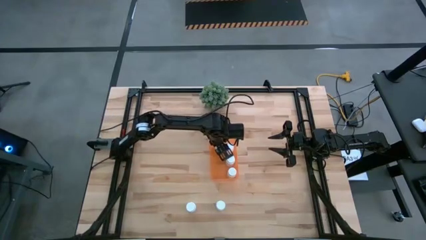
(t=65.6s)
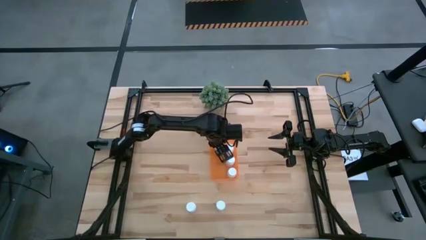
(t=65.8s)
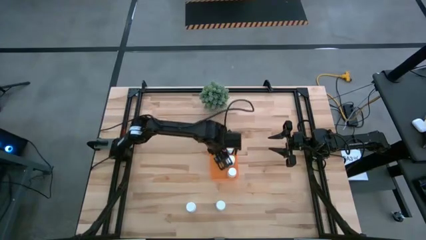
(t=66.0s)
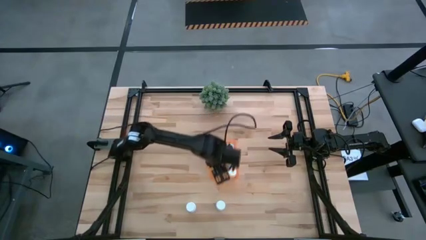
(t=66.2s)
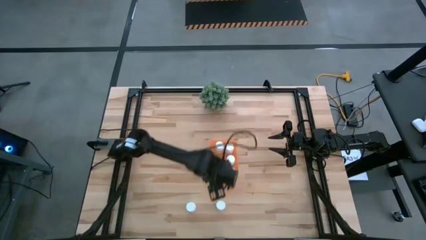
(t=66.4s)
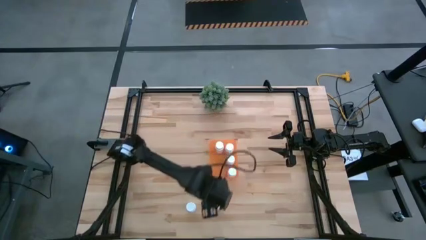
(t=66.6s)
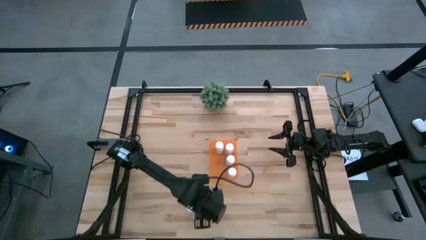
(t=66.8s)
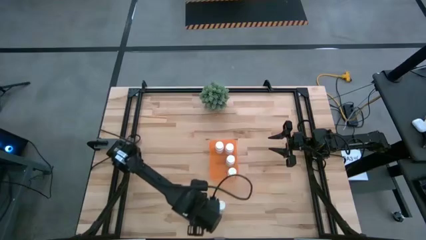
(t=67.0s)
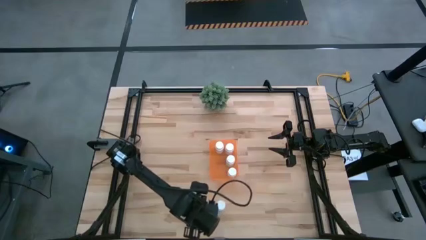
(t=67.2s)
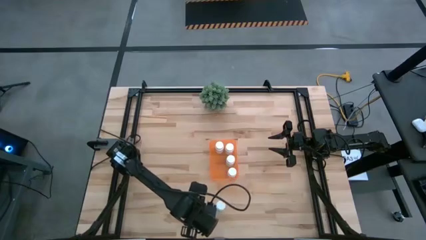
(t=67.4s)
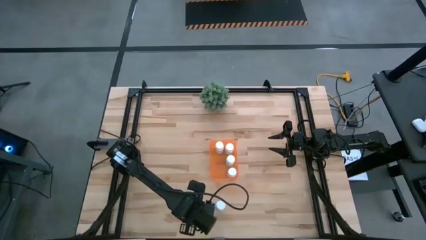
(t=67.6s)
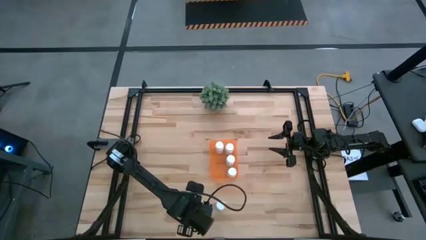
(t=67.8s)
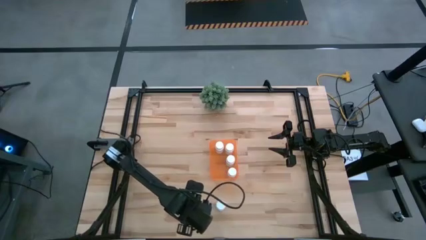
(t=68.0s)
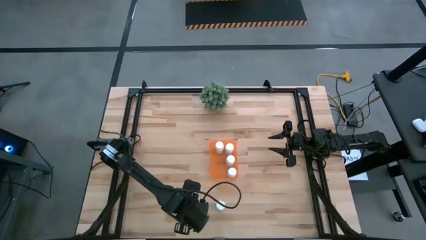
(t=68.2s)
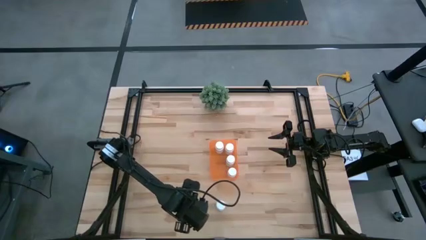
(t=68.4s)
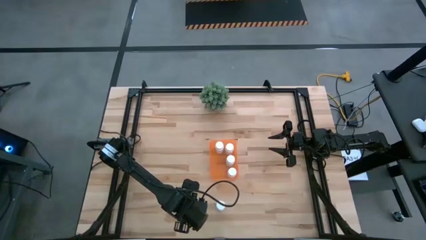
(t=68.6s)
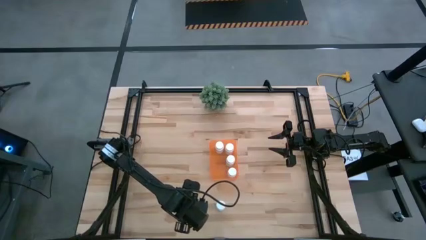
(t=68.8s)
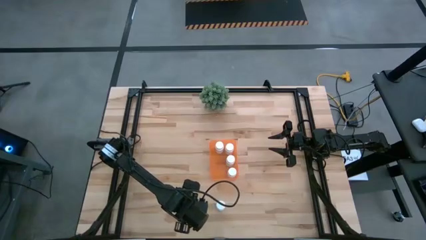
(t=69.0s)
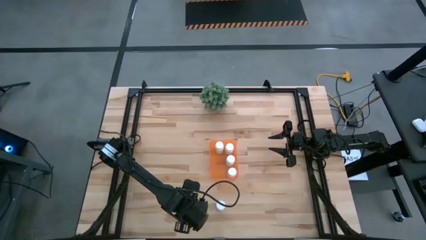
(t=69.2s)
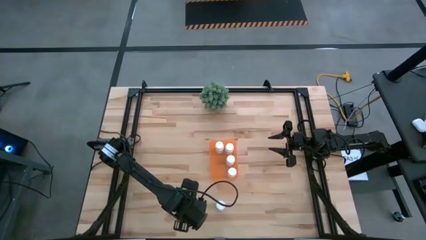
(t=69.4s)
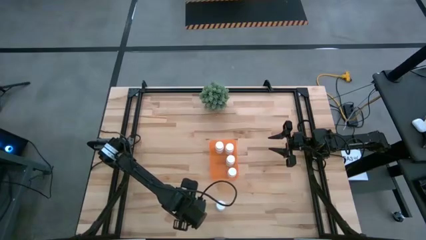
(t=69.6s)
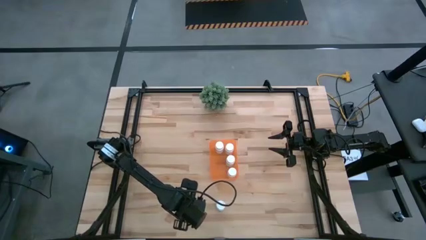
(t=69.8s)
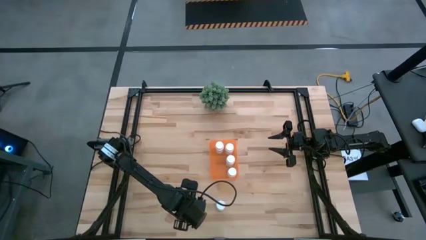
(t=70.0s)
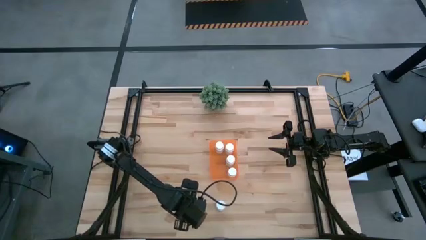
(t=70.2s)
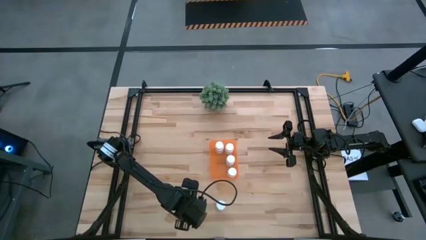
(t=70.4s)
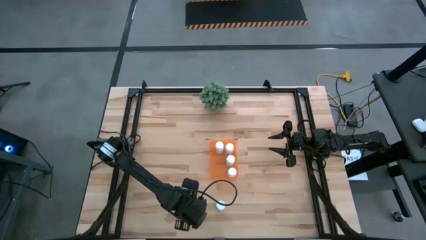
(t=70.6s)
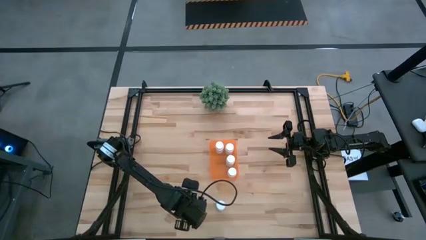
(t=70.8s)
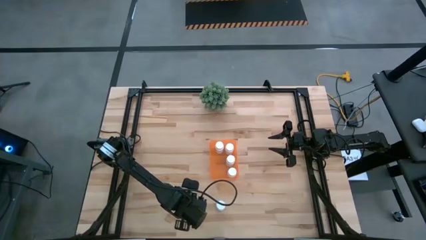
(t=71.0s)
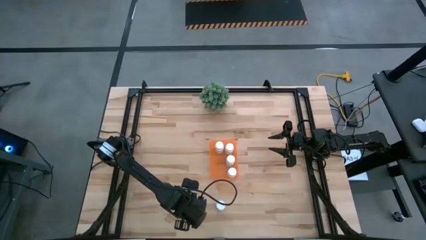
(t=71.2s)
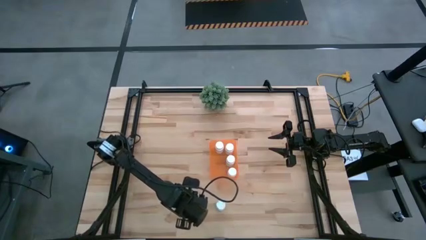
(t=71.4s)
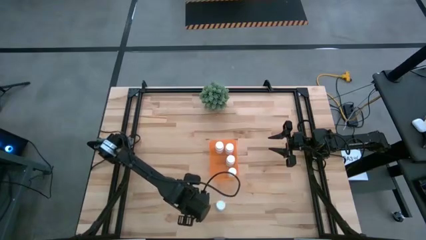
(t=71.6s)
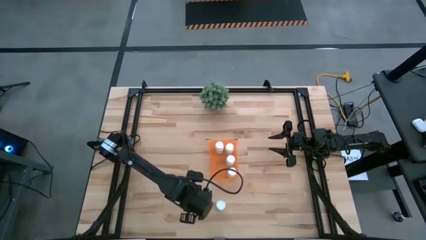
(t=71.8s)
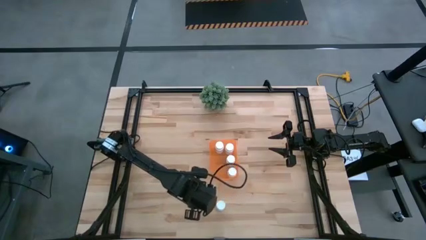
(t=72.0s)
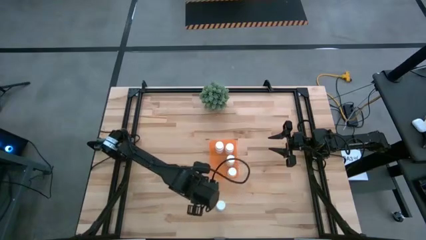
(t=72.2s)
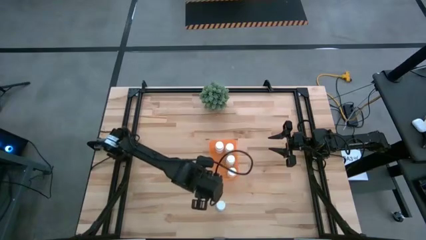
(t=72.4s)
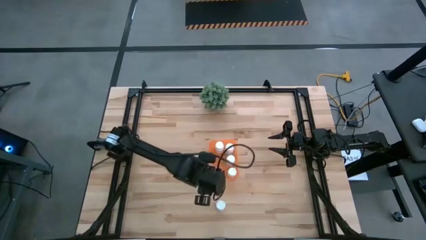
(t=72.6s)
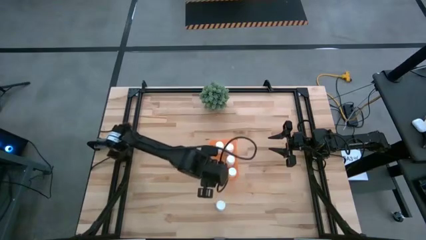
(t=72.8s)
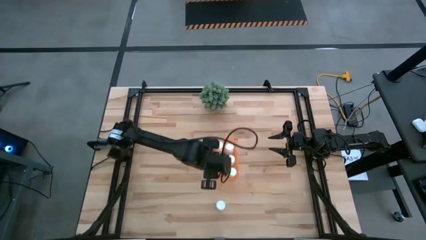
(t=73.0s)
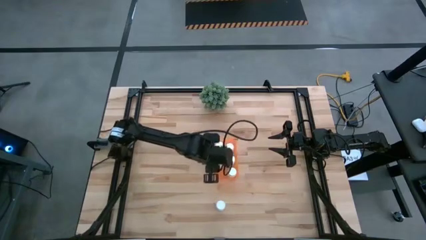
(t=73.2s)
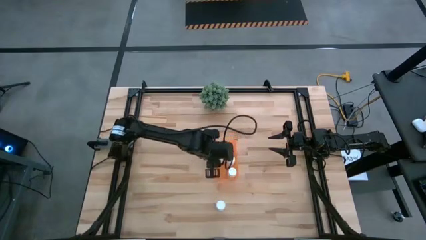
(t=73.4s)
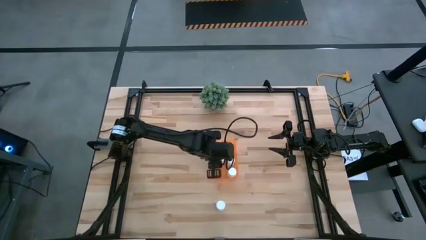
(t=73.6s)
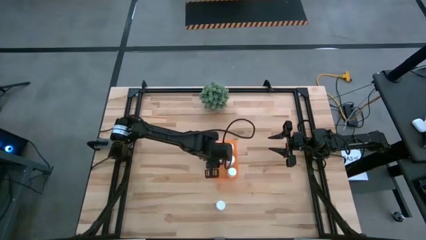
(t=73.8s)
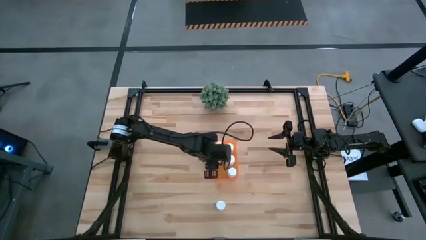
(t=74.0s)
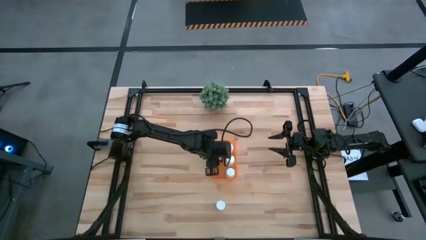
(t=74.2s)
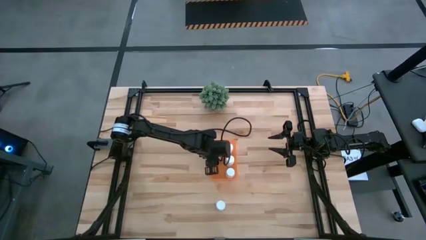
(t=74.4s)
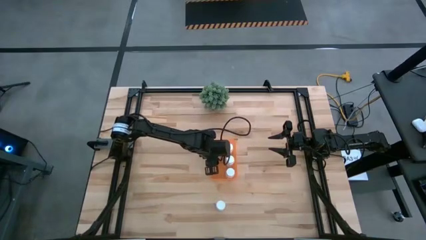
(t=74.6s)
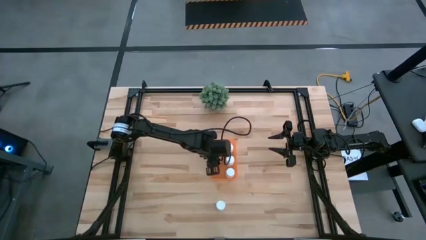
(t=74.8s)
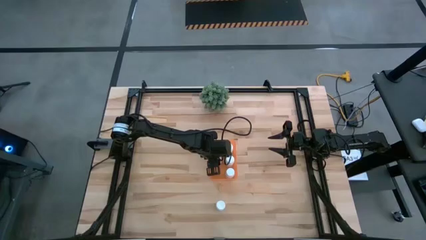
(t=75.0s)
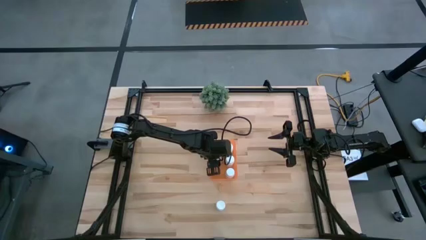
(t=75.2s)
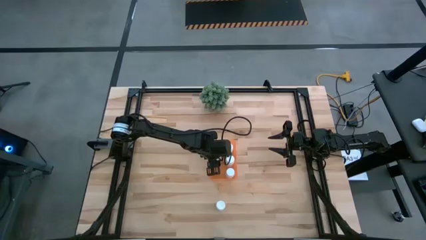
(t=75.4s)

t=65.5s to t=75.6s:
Task: Pick and place pill bottles into a basket
Put the white pill bottle into the orange bin

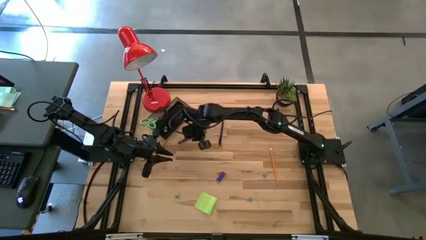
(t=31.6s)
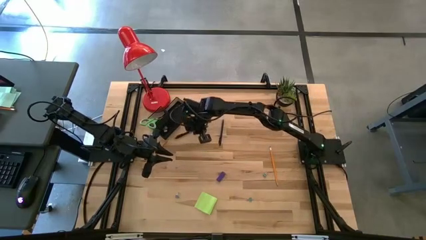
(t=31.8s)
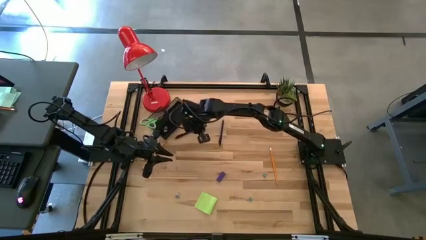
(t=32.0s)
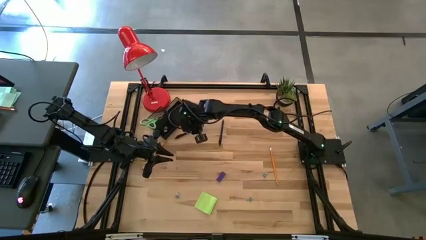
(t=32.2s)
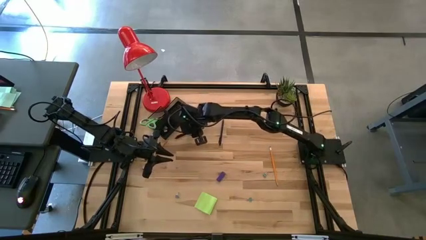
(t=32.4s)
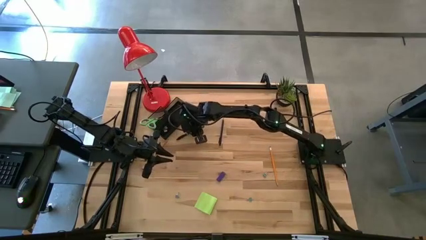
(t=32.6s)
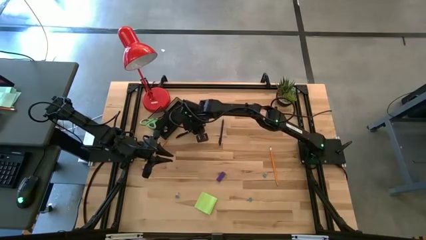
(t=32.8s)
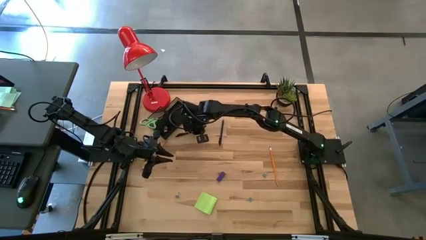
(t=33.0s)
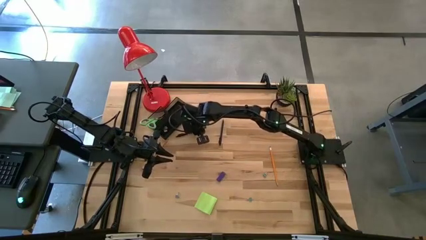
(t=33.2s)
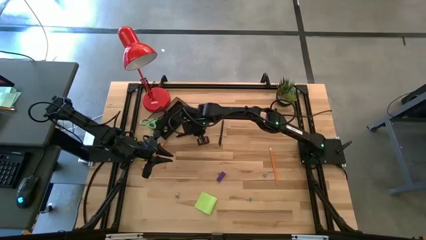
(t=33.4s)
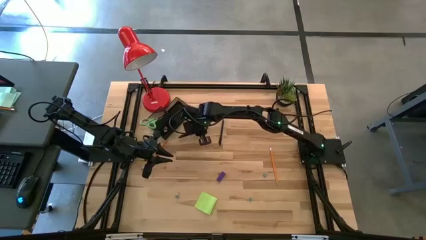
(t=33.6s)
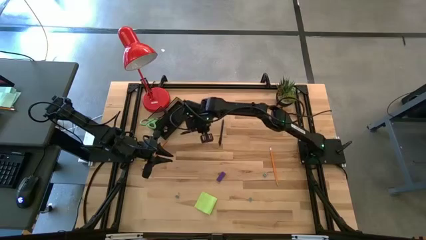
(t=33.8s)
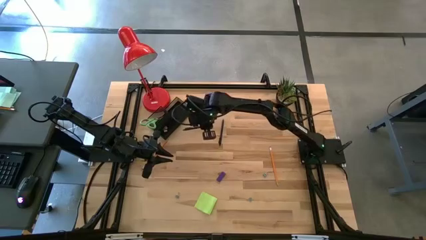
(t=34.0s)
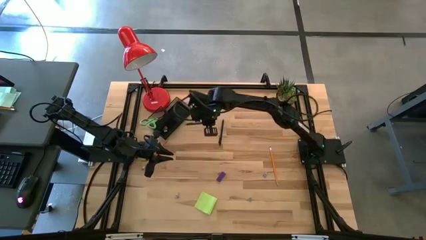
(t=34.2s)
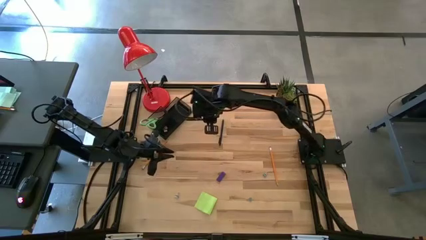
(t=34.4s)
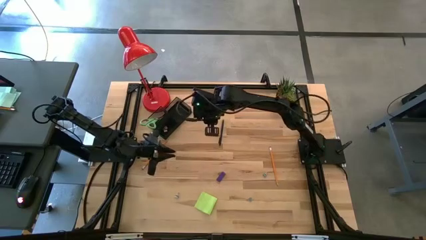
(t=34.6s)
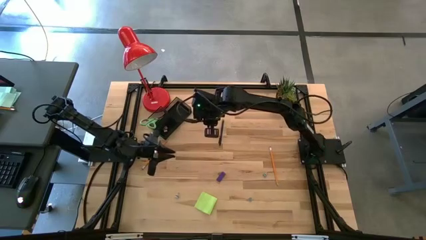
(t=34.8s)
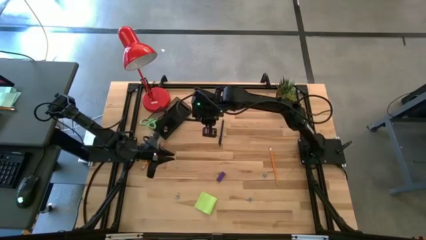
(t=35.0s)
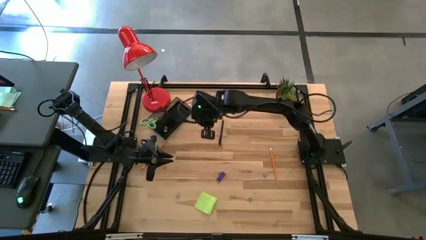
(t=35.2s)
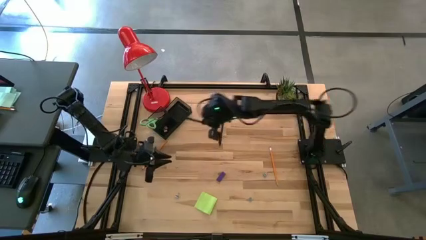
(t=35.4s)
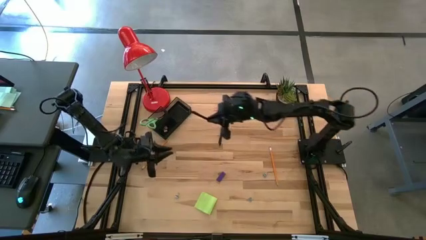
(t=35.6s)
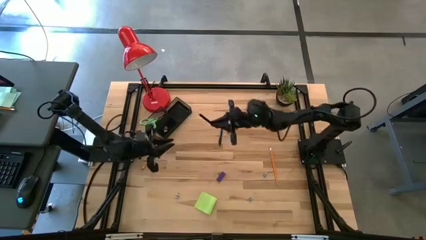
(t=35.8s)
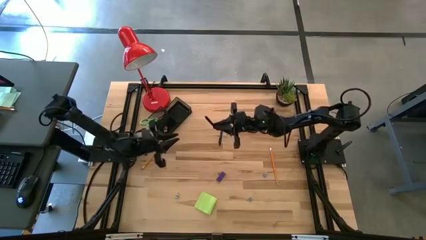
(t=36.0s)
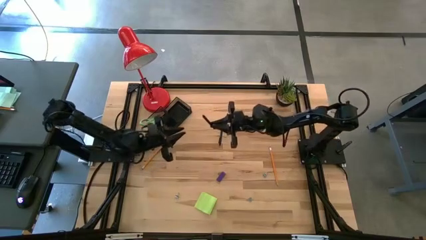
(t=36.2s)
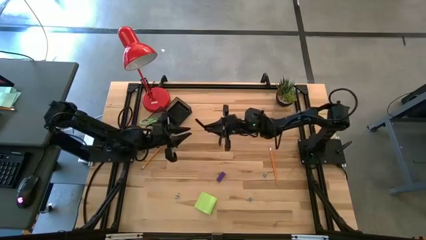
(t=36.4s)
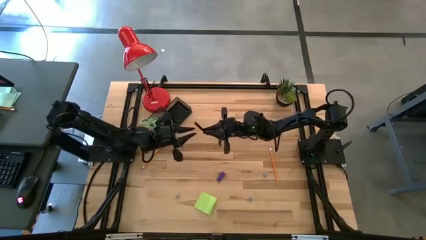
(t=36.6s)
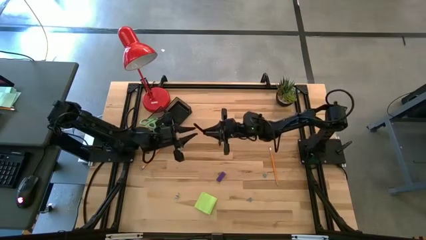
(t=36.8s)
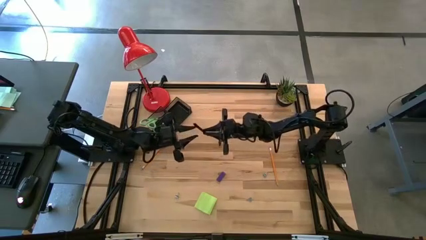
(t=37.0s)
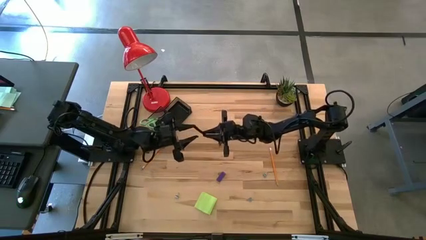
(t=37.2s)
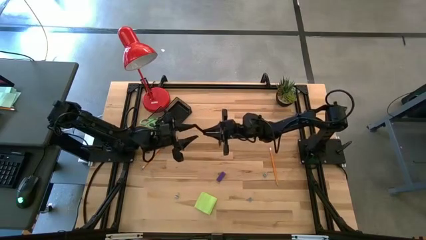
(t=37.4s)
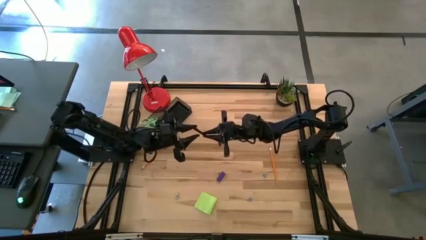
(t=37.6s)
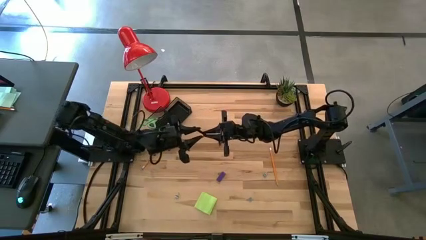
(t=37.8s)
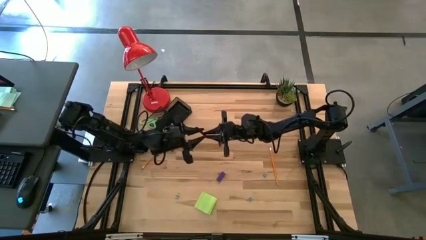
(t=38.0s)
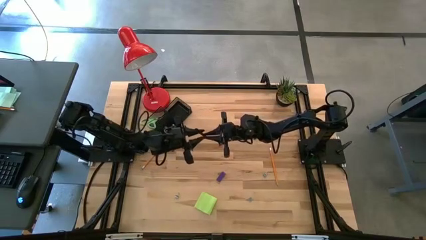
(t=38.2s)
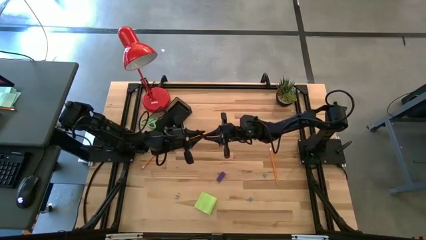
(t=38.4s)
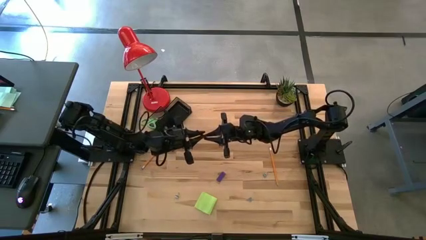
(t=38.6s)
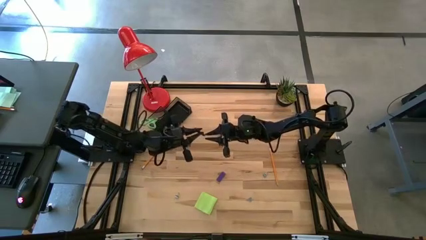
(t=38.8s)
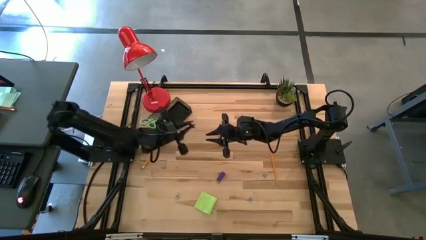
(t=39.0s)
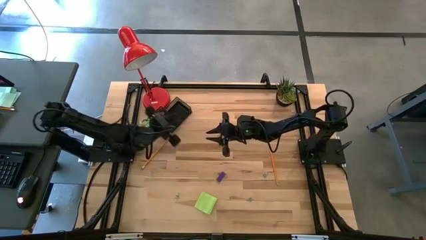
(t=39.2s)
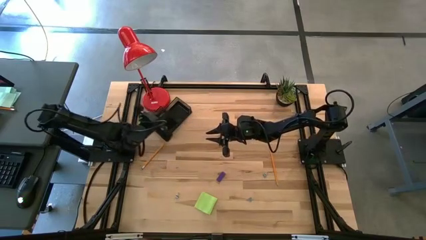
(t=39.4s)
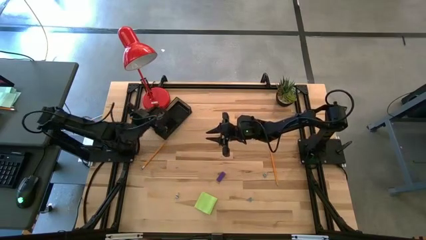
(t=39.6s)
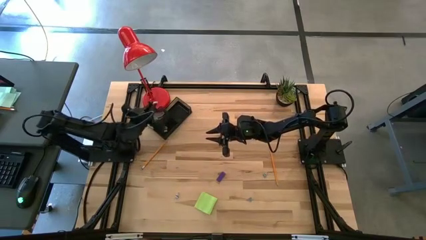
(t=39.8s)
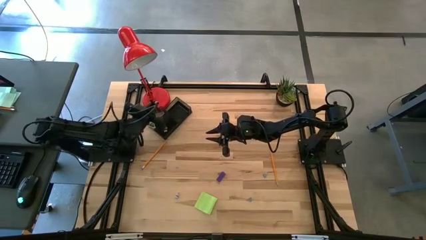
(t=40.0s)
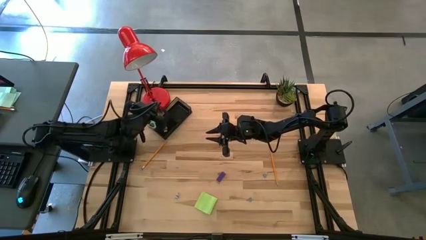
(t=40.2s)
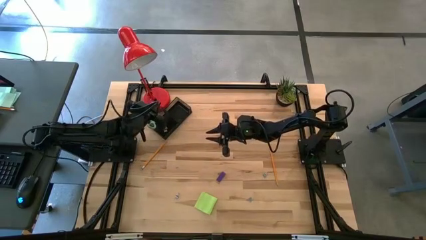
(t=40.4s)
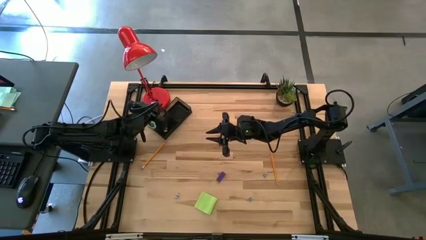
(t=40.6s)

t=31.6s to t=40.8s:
Task: Pick and place office supplies into organizer
Put the left black pen into the desk organizer
